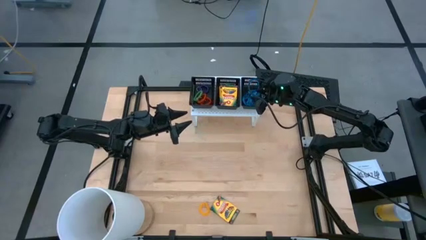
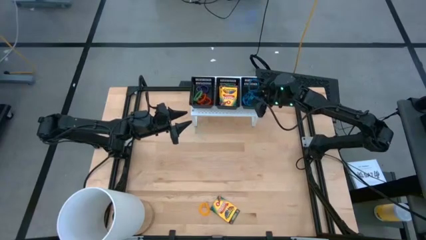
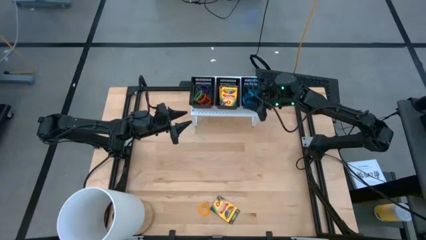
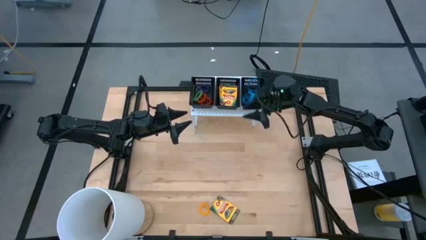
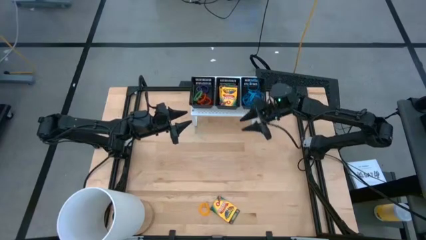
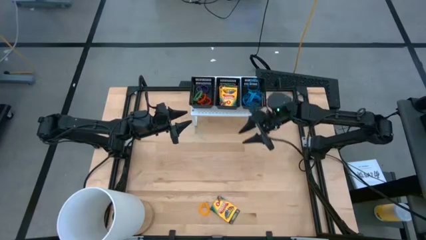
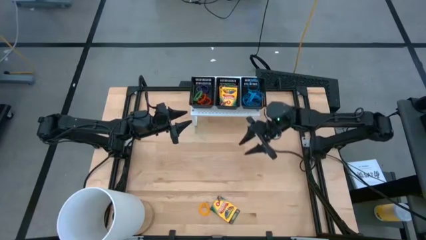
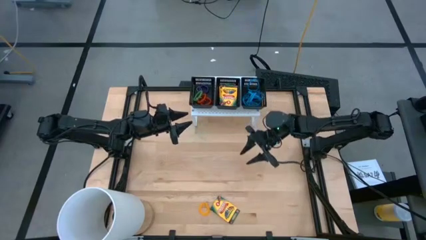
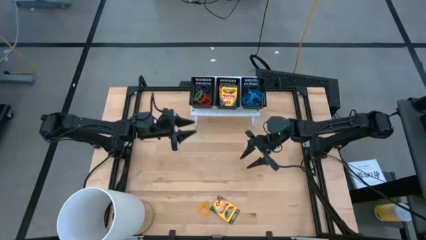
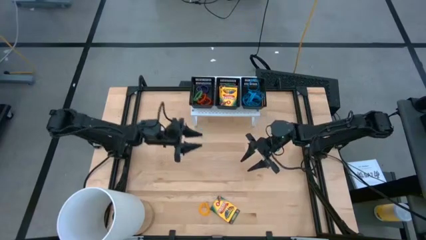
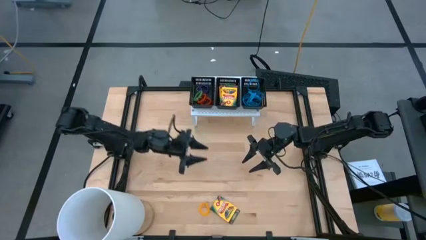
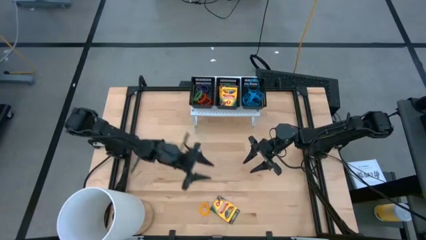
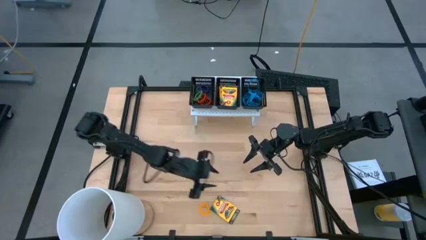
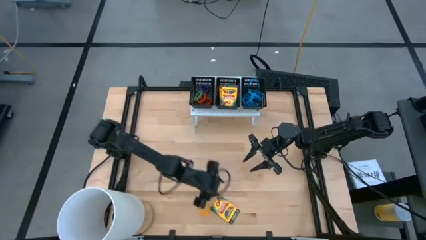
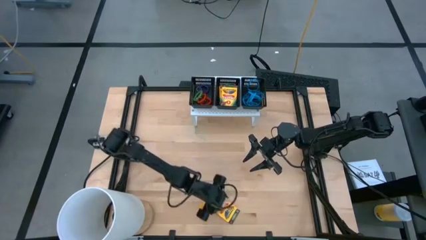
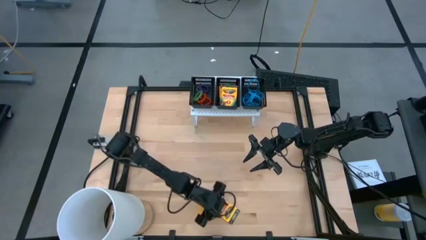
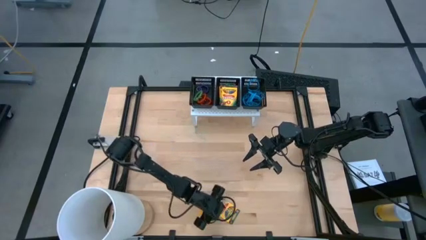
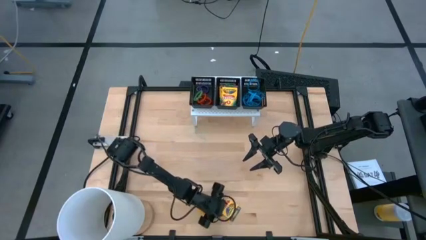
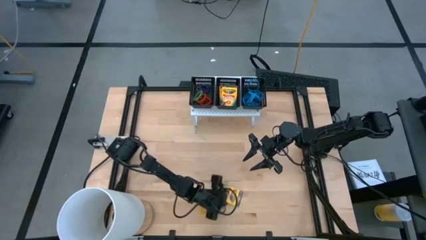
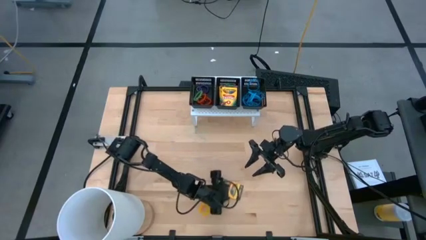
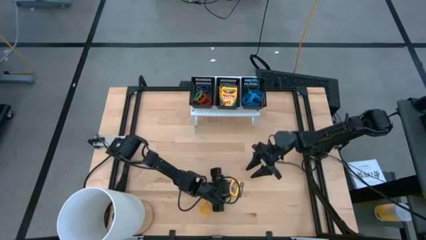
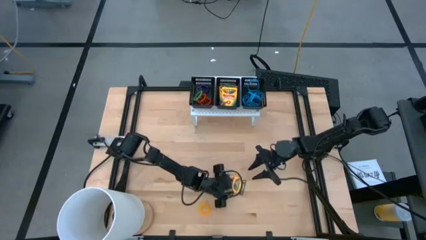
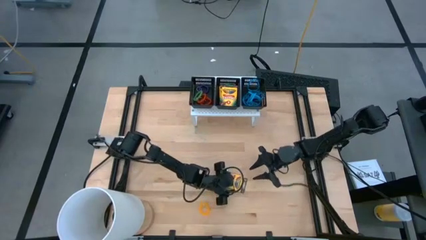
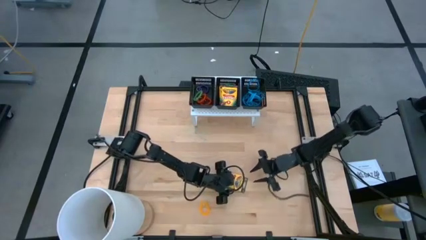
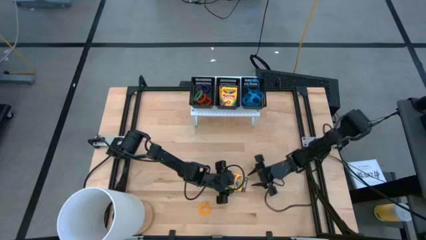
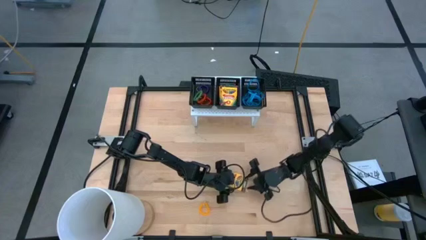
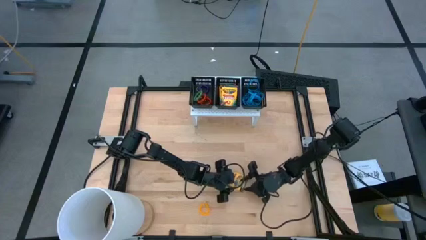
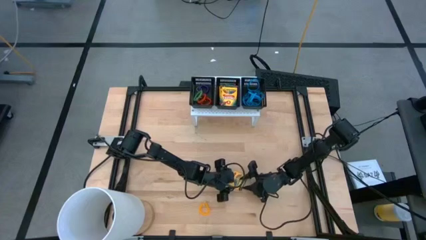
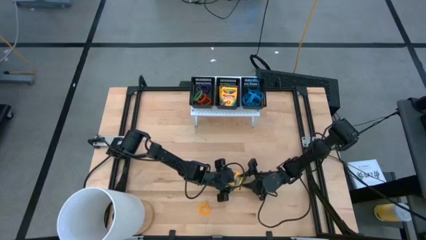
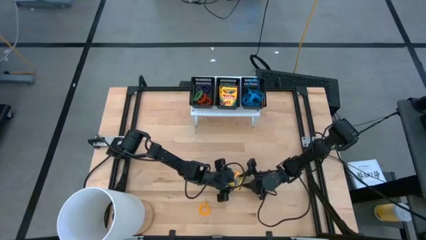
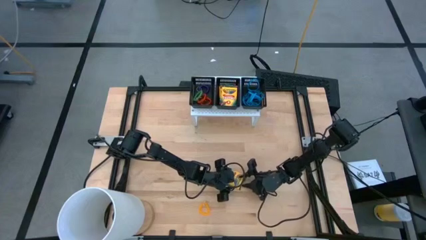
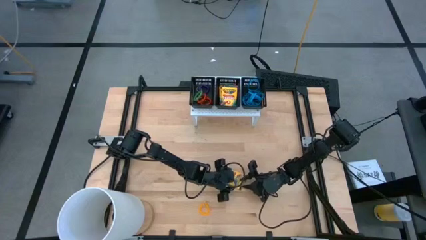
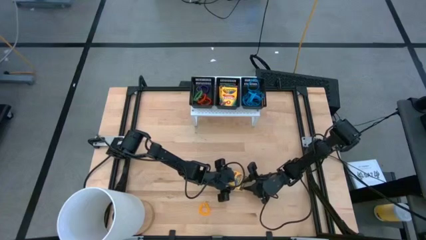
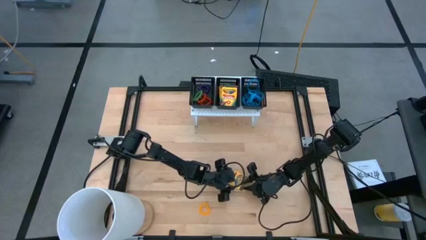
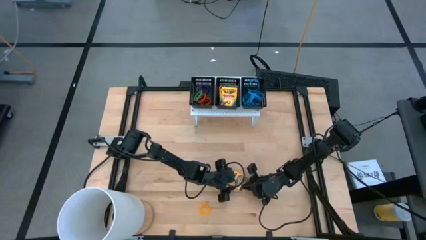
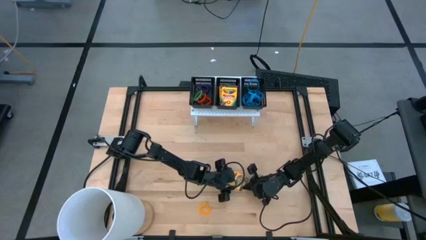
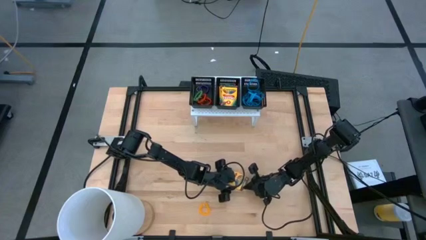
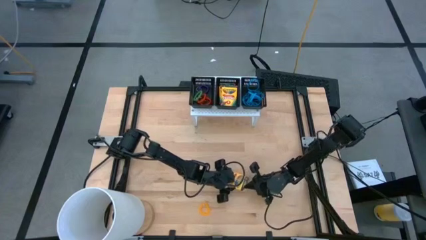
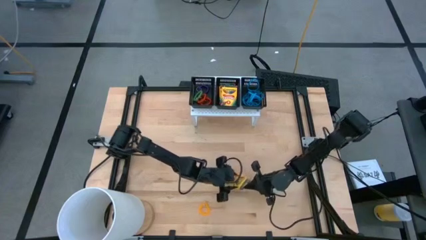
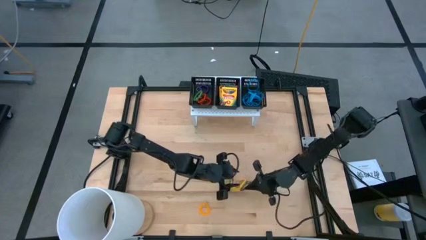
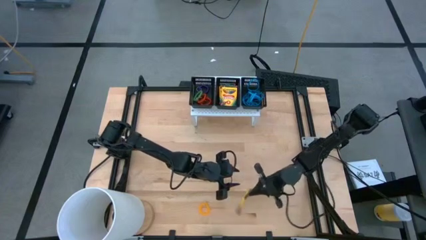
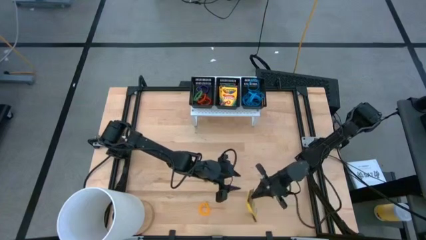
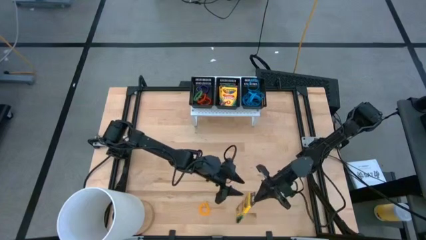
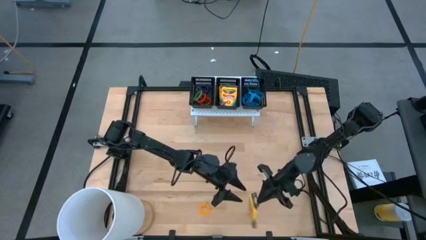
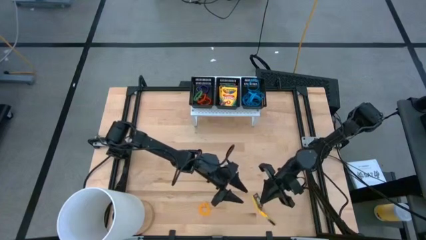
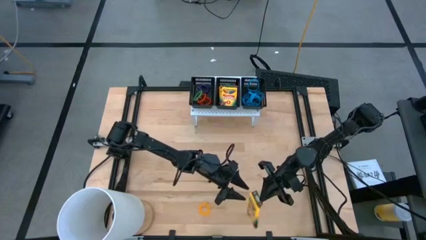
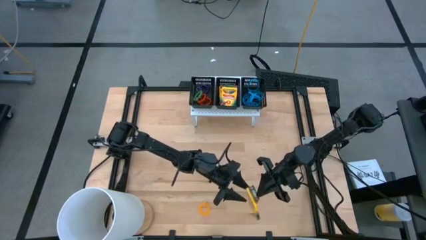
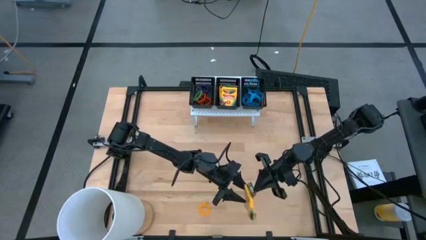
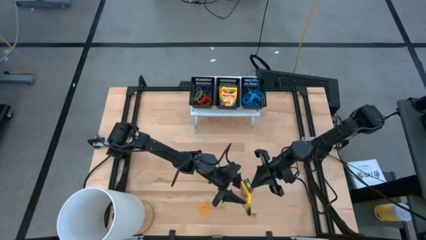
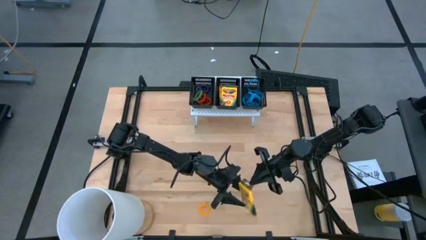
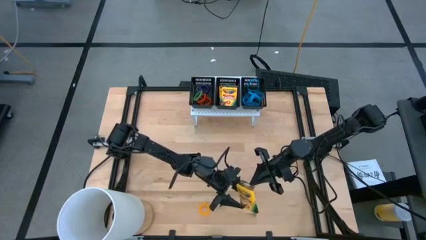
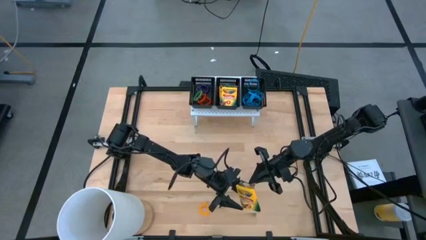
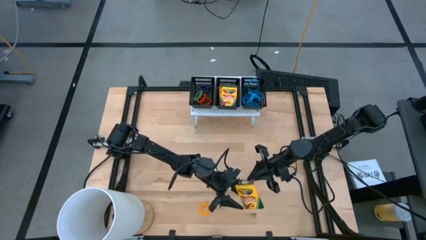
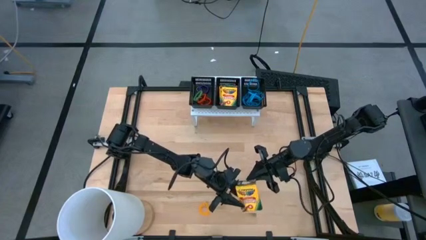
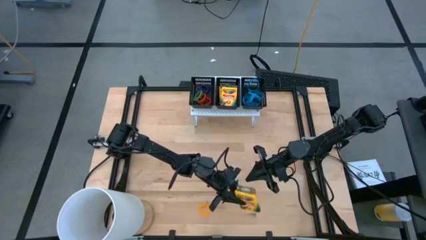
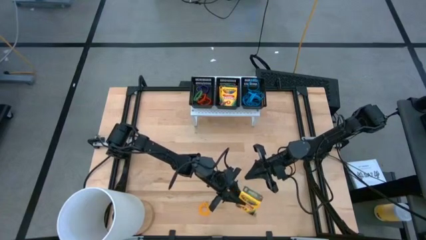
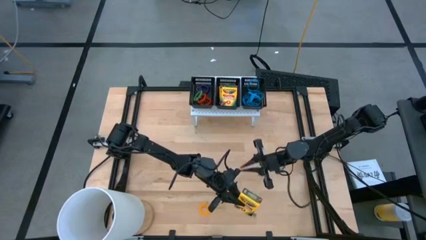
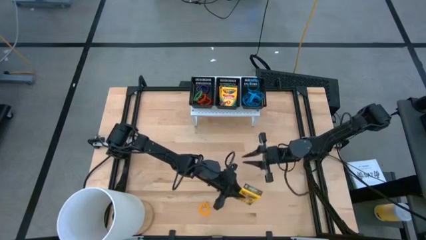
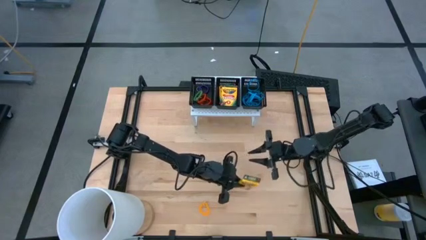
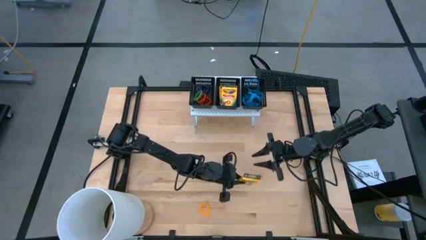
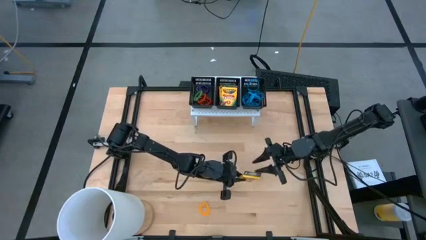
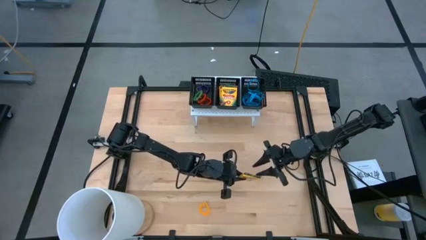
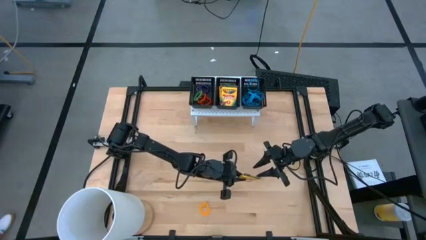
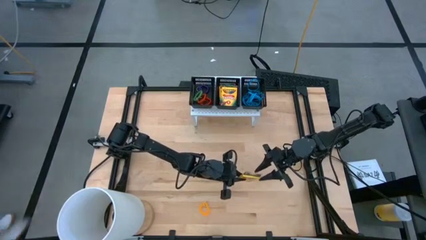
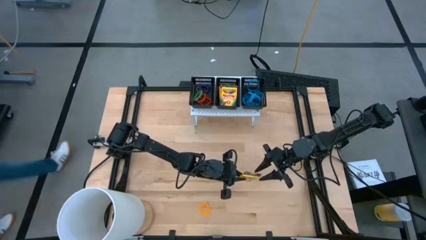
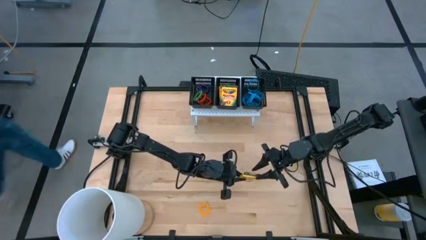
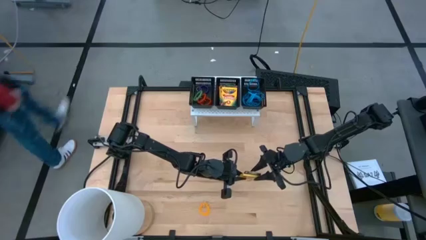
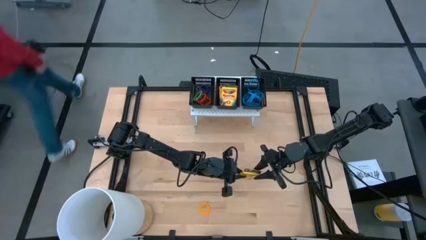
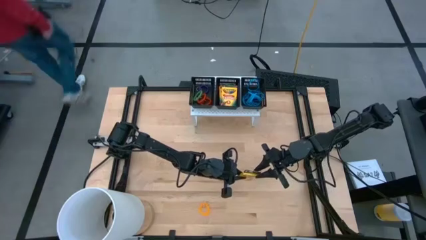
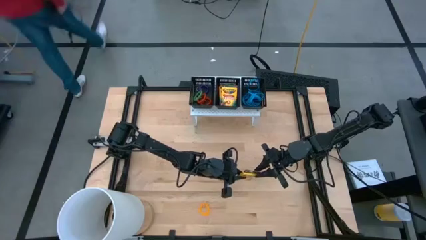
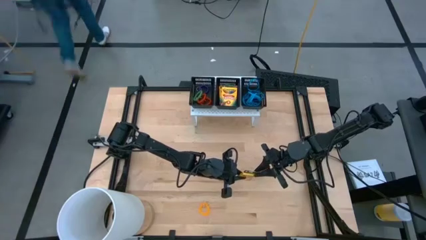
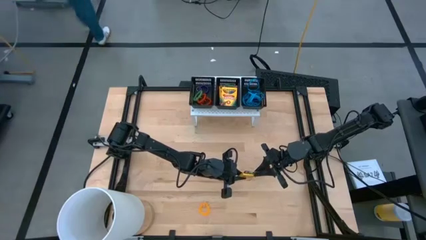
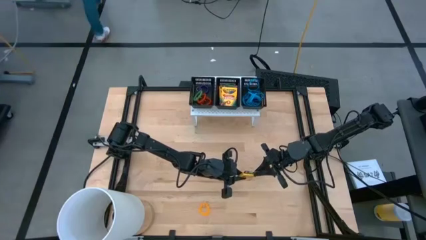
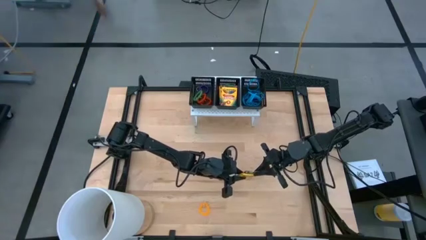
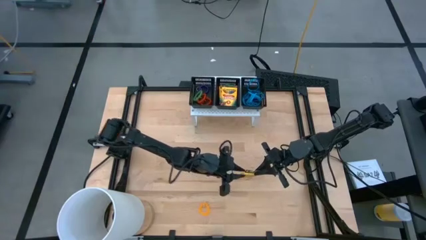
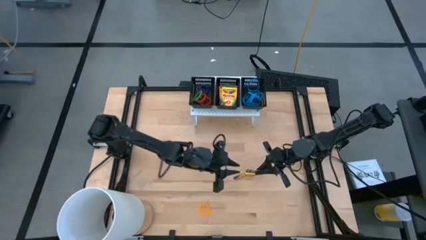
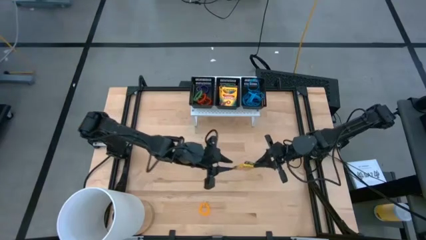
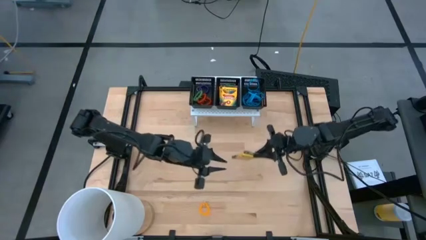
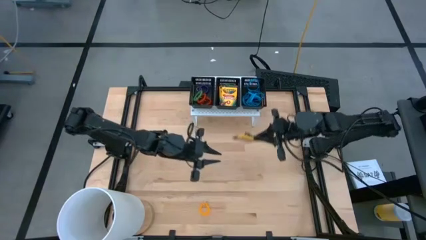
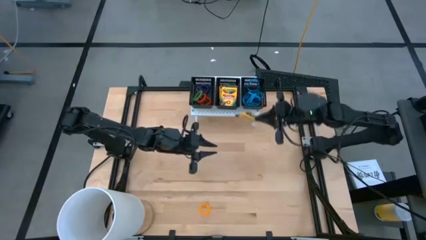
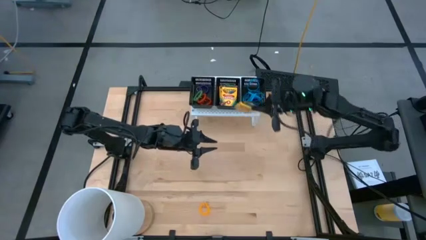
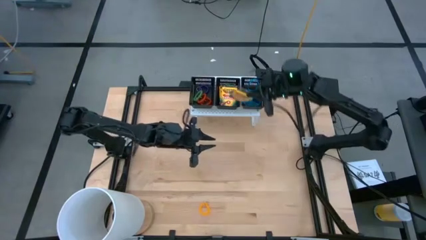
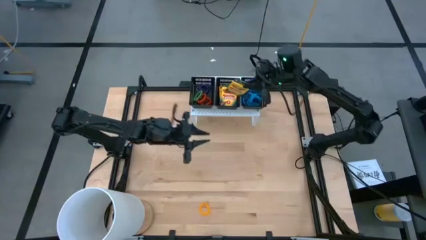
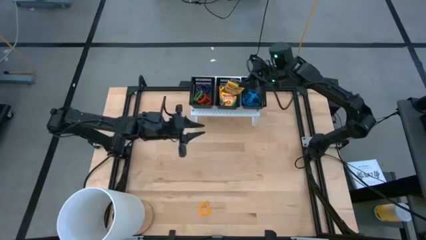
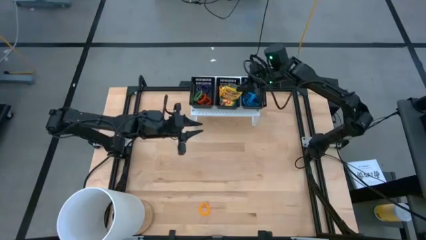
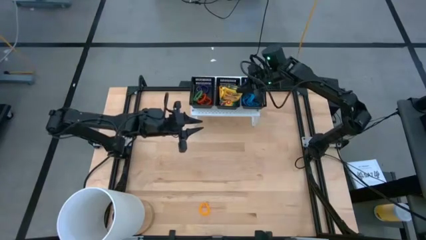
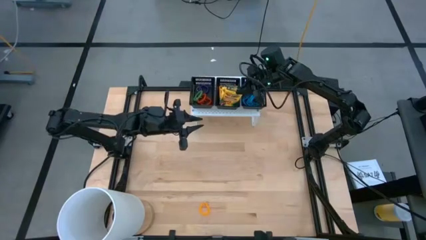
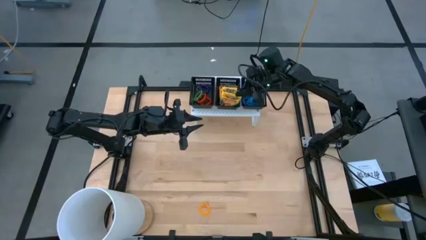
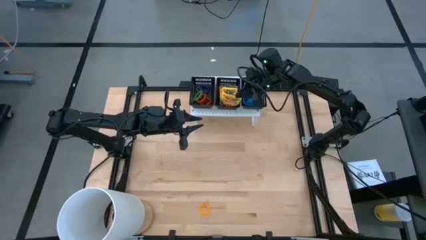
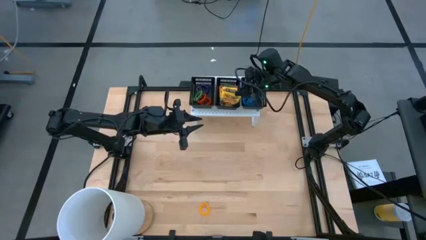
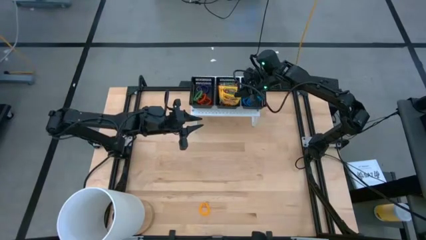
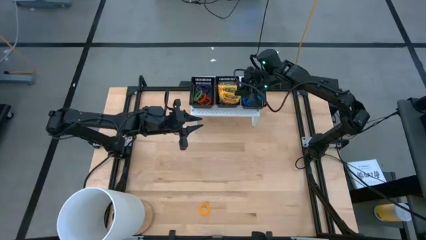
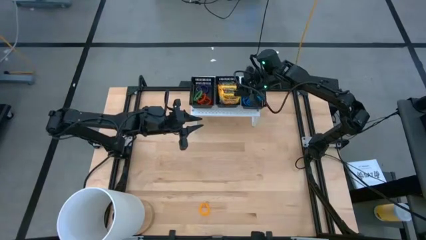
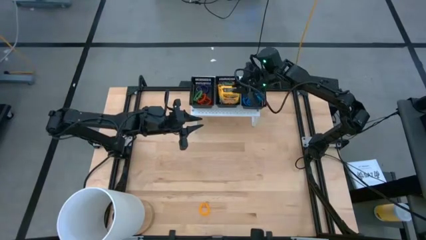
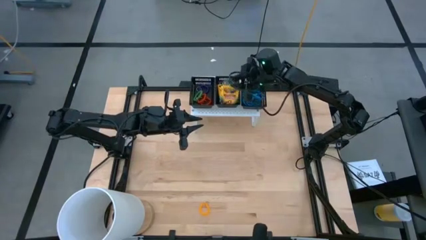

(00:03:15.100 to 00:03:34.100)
Task: Pick & Place Office Desk Supplies
Put the crayon box into the middle black bin on the shelf
